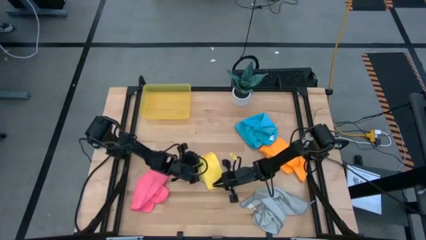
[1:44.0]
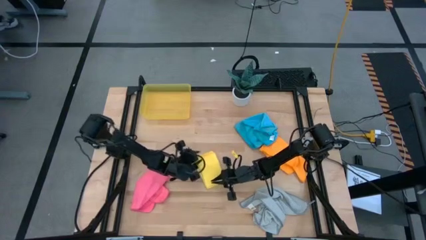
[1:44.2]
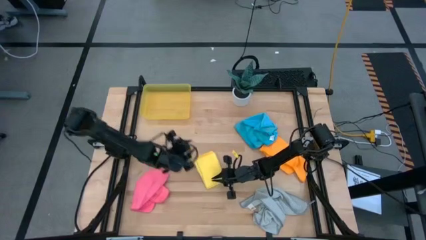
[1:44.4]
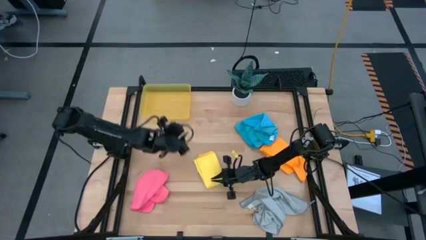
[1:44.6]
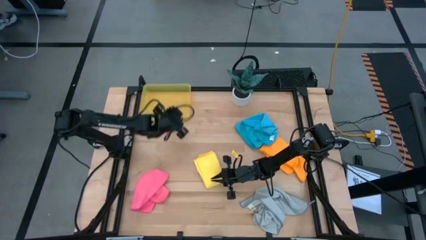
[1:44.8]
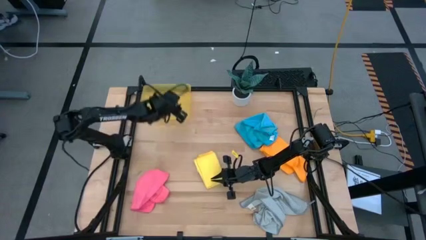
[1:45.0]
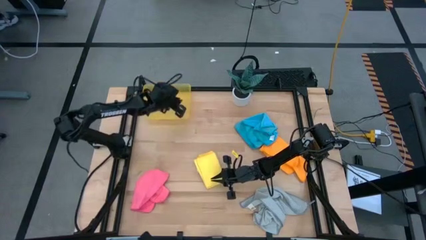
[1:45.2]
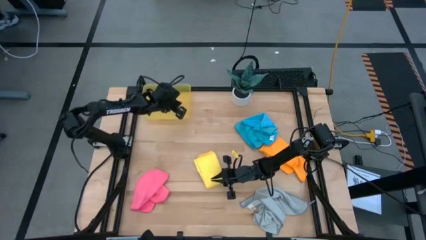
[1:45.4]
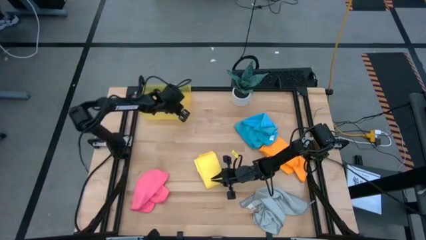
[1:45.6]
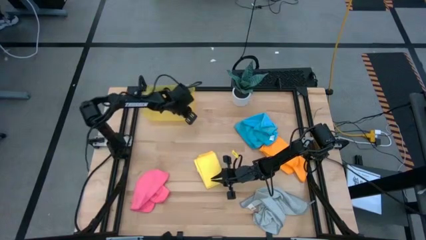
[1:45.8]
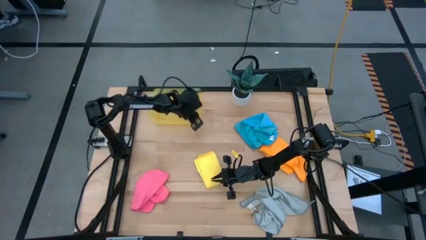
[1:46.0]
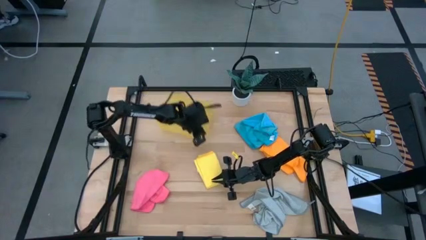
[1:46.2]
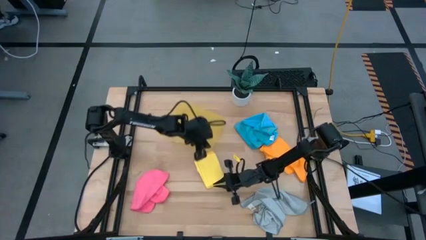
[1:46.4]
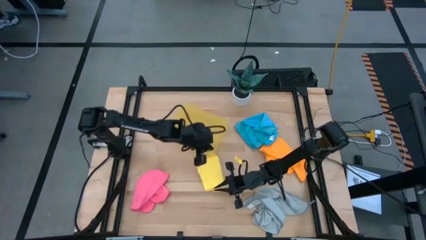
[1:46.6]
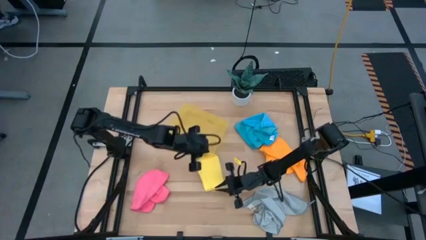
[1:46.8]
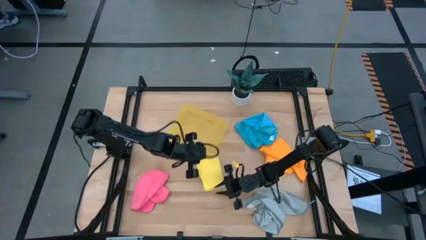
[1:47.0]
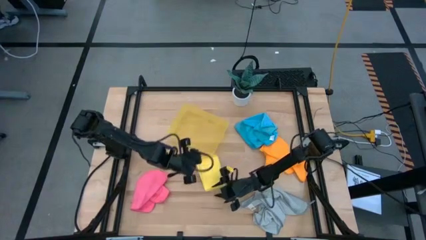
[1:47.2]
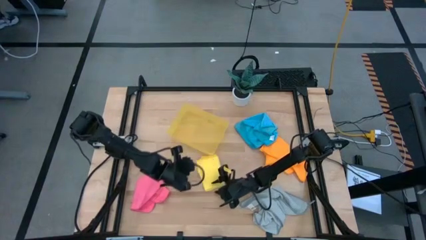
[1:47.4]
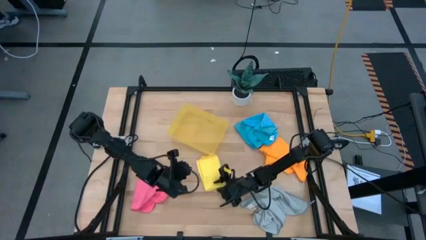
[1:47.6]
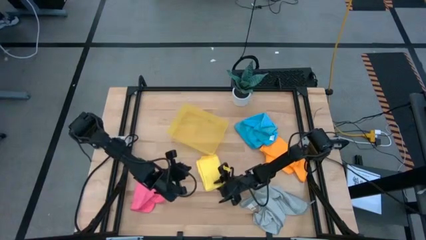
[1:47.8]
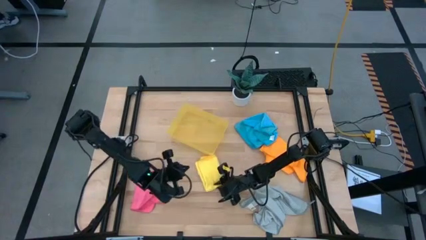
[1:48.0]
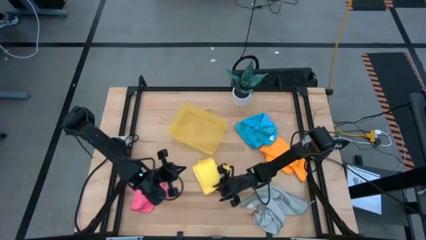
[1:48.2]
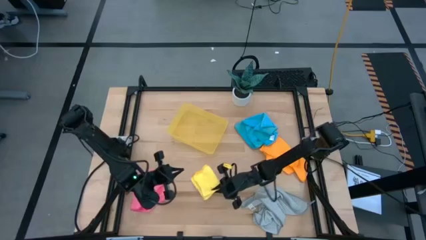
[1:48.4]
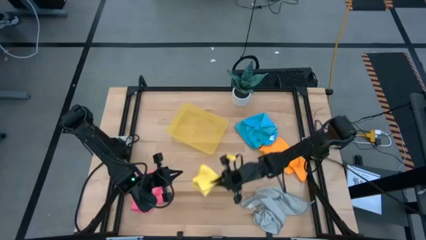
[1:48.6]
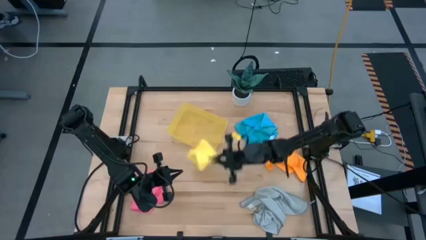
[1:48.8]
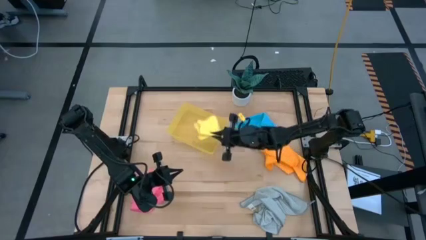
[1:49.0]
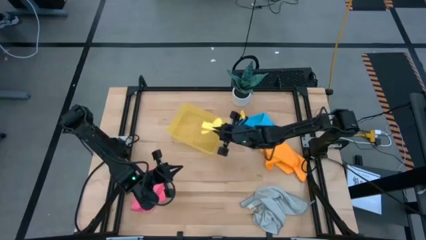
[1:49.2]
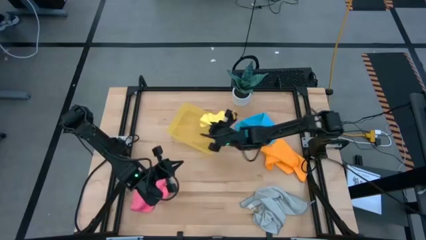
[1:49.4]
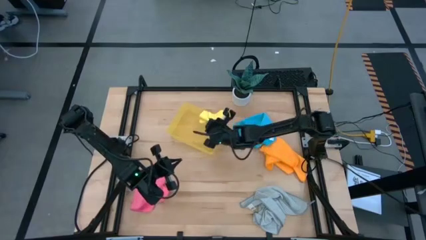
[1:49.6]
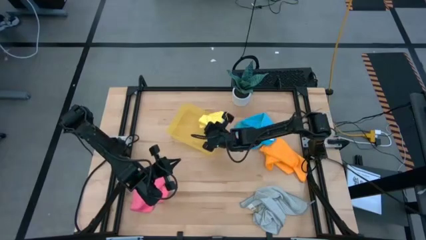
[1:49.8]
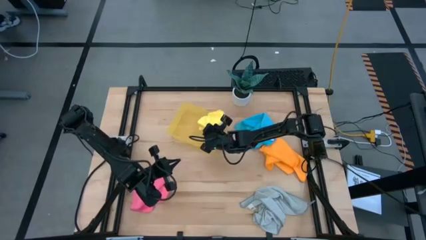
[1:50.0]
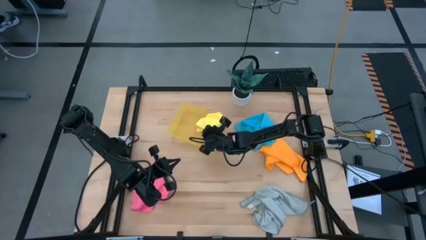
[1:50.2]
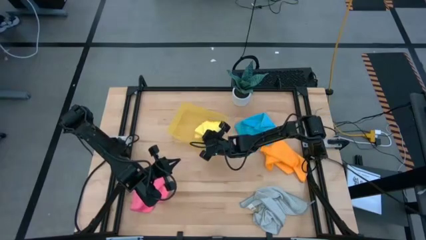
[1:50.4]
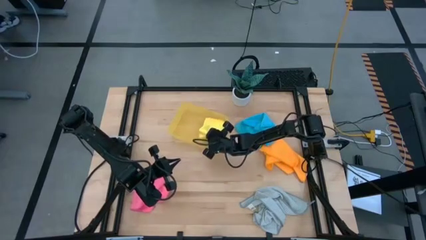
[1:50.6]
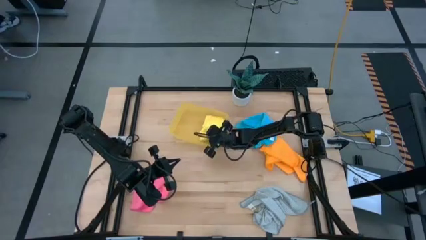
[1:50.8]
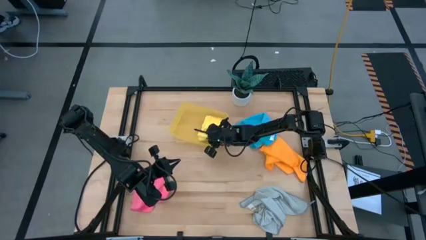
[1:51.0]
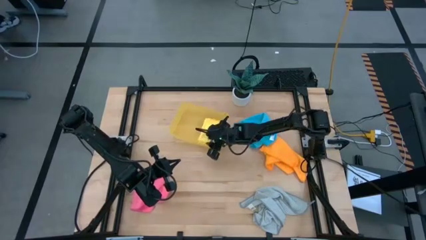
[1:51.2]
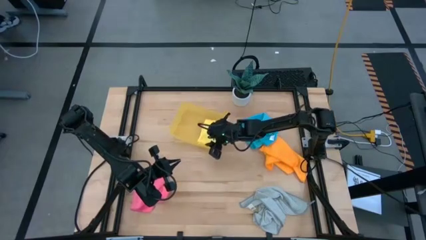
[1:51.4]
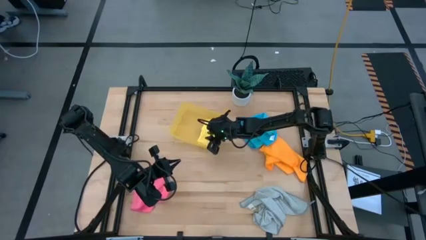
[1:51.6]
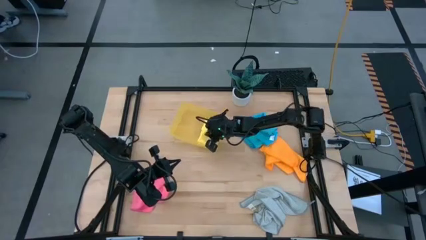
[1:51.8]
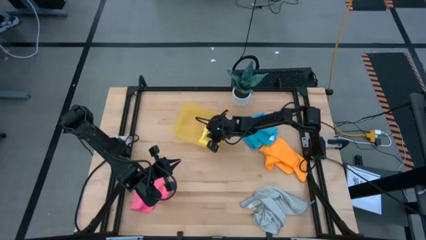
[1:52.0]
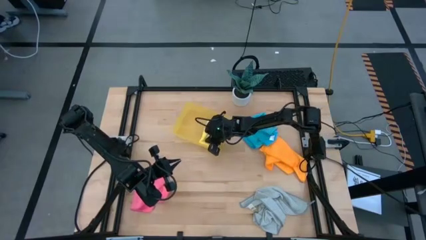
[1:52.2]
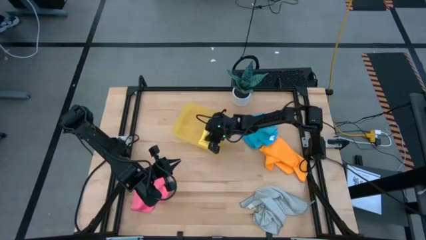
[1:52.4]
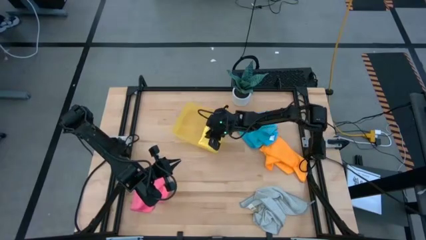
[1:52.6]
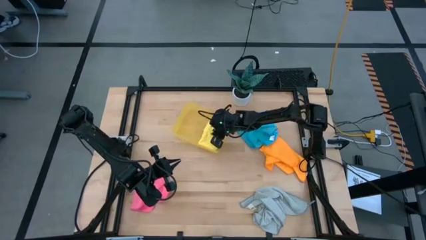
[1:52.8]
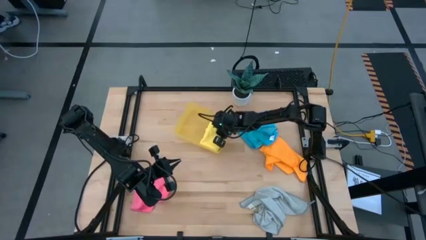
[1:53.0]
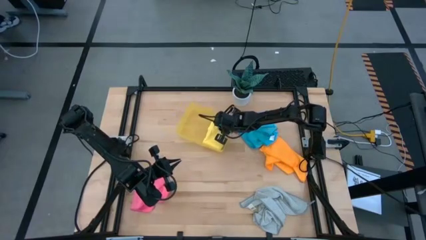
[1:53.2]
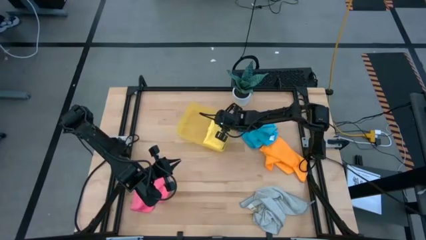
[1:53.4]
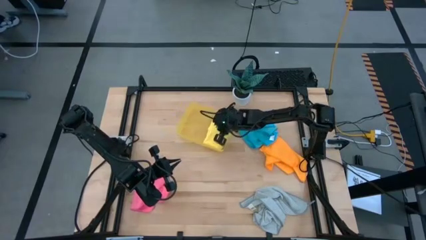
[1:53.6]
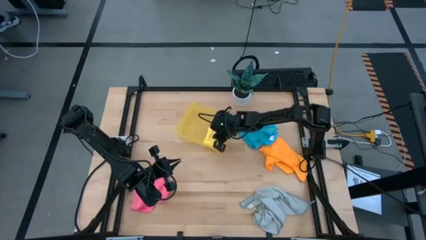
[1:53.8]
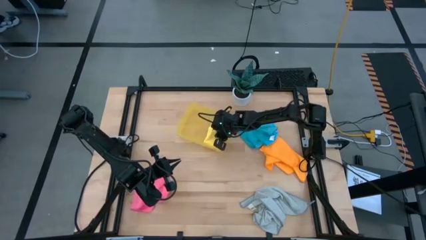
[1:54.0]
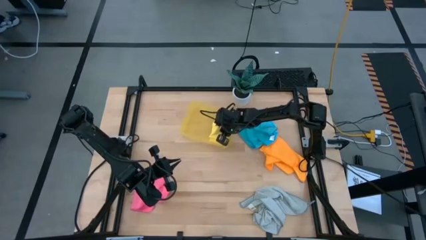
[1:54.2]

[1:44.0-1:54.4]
Task: Fold microfiber towels
Put the yellow microfiber cloth into the yellow bin

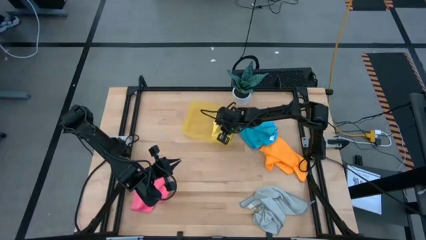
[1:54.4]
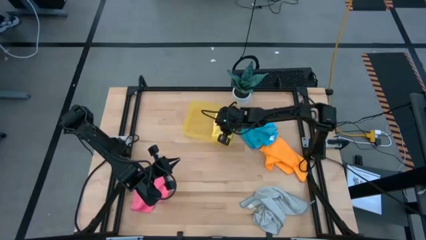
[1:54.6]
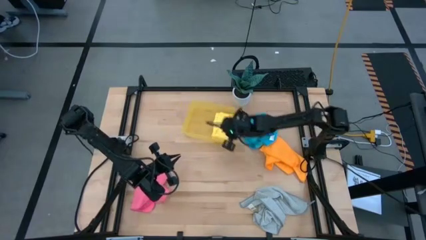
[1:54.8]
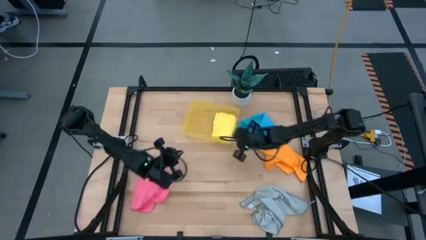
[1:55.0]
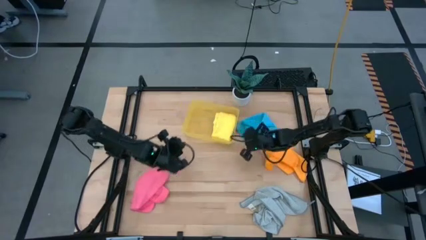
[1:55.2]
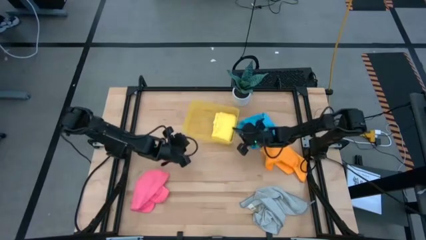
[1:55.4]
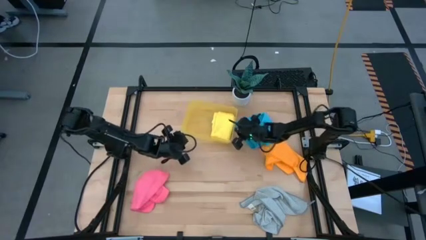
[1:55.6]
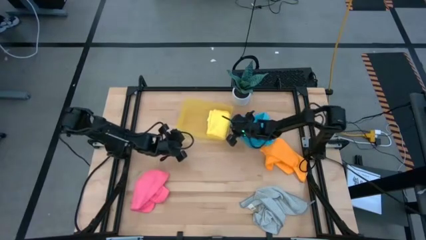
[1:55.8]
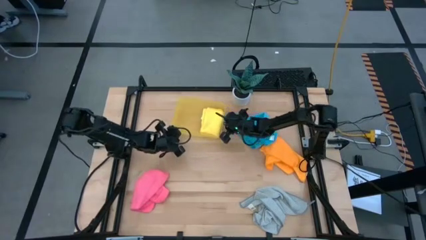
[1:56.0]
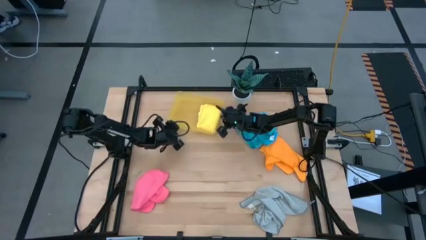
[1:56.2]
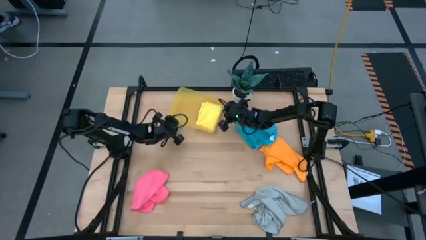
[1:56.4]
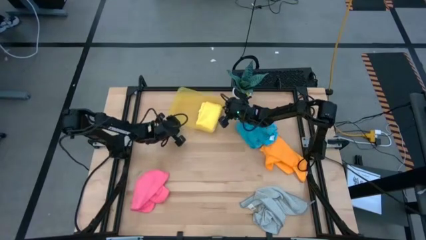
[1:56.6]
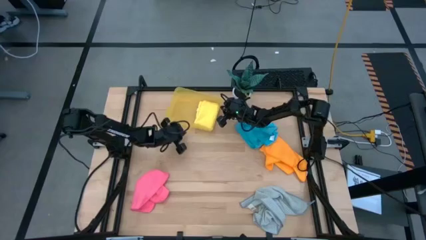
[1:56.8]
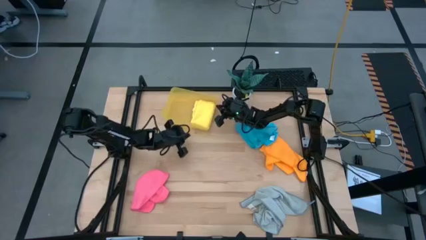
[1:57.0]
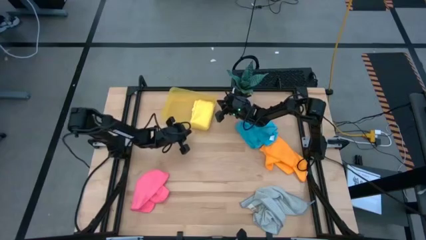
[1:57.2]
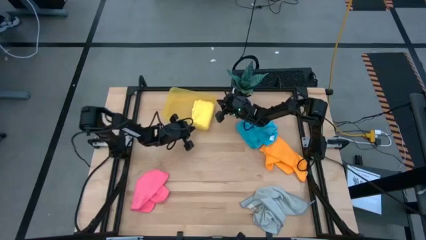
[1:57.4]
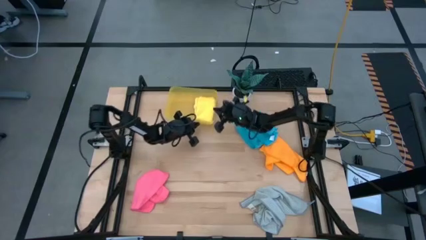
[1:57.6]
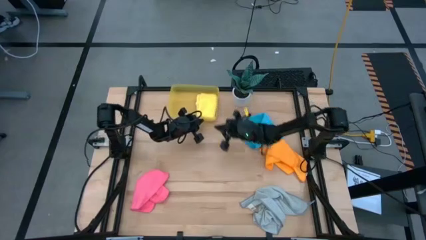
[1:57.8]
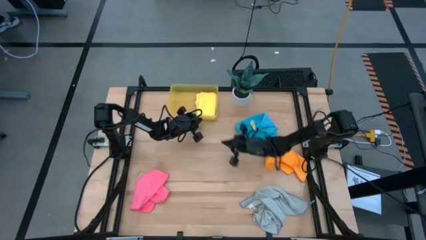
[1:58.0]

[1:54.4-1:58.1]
Move the yellow bin to the top left of the table

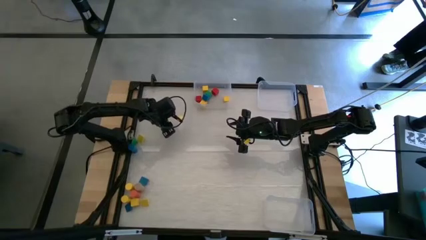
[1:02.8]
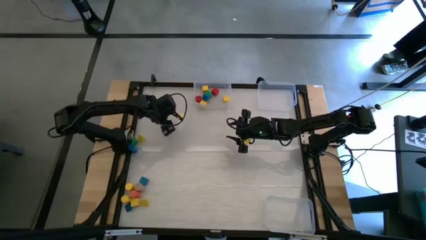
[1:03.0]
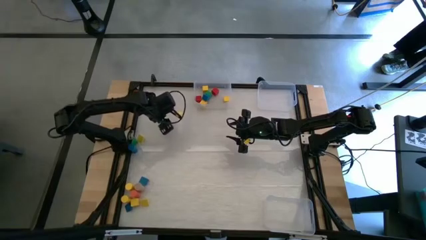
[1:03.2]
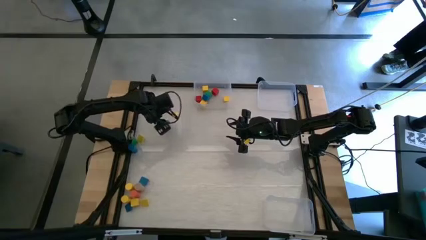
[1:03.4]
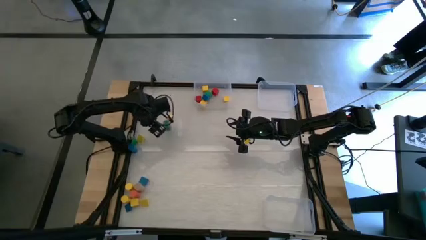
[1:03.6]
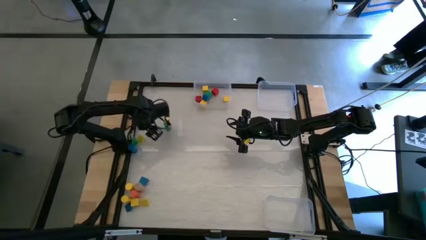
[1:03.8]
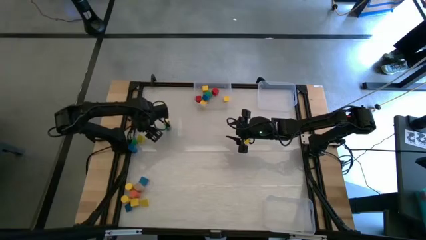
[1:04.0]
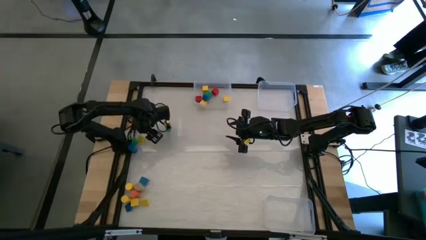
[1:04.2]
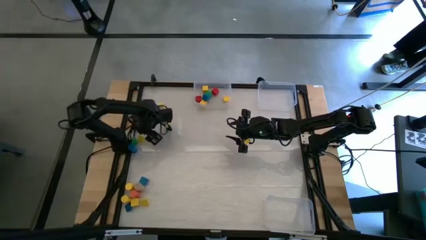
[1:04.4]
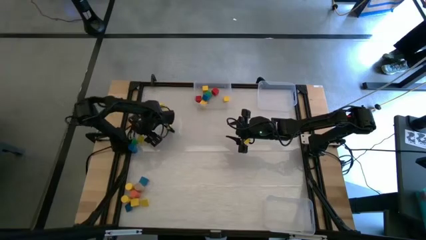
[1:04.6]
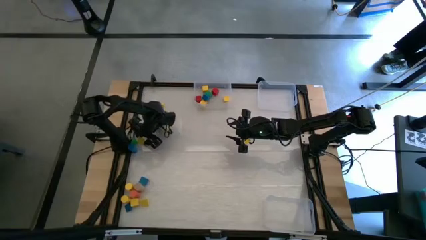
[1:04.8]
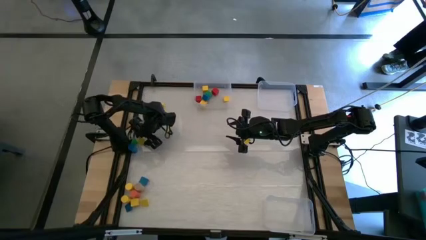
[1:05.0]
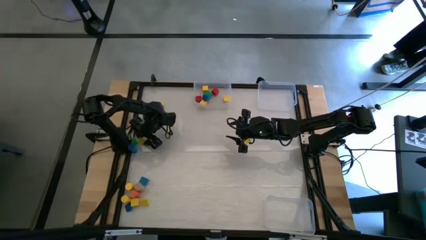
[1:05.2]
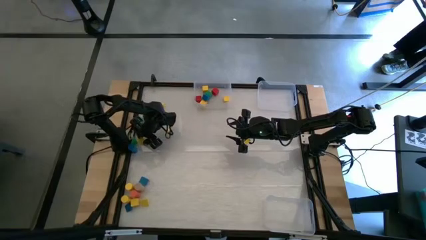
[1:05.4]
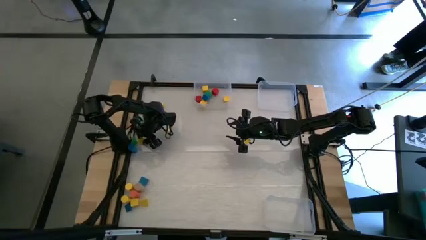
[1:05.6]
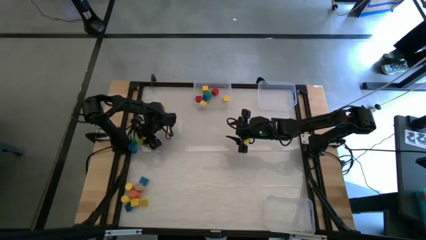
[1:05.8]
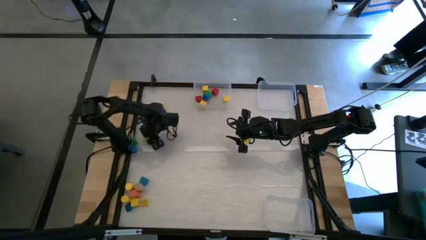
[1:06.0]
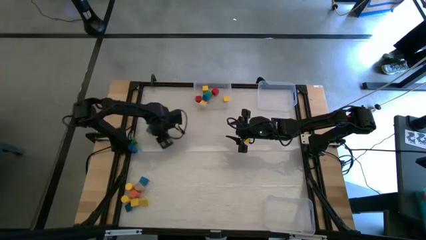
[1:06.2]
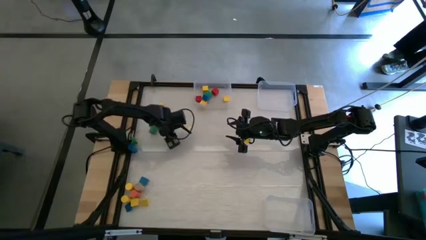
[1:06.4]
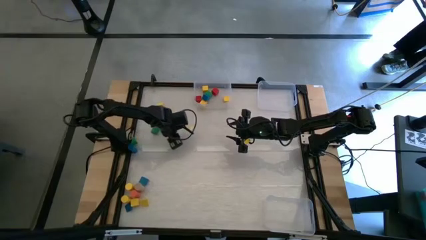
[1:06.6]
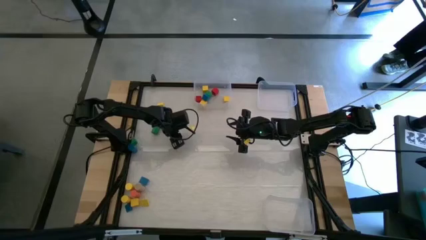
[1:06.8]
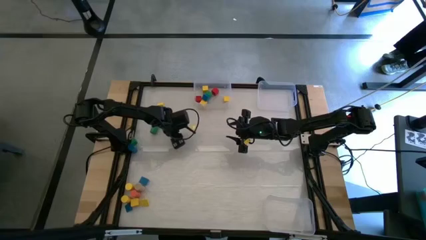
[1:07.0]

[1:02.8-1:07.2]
Task: Sort blocks by size
Adjust the yellow triangle block
